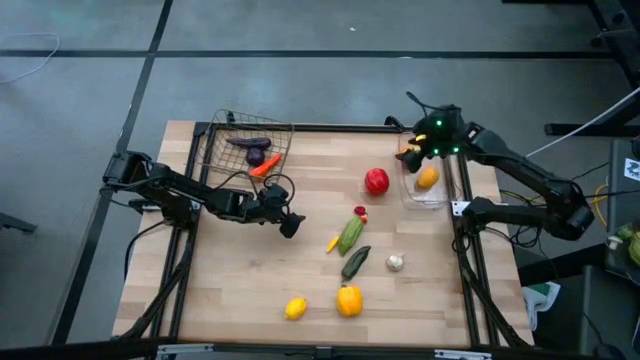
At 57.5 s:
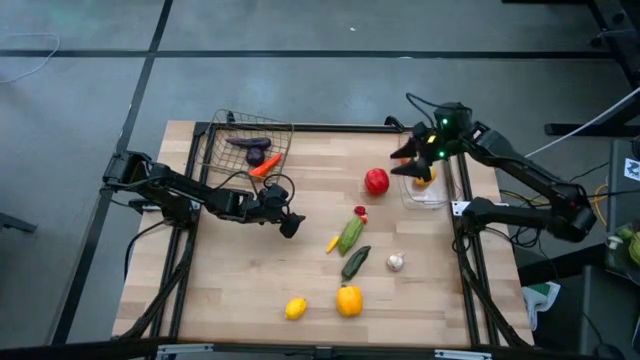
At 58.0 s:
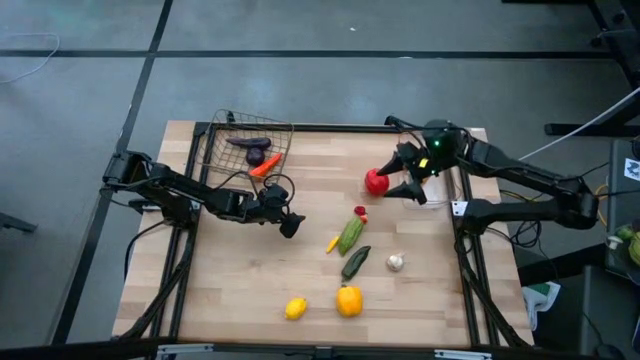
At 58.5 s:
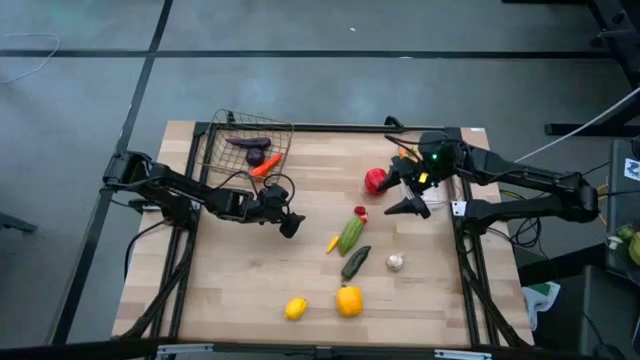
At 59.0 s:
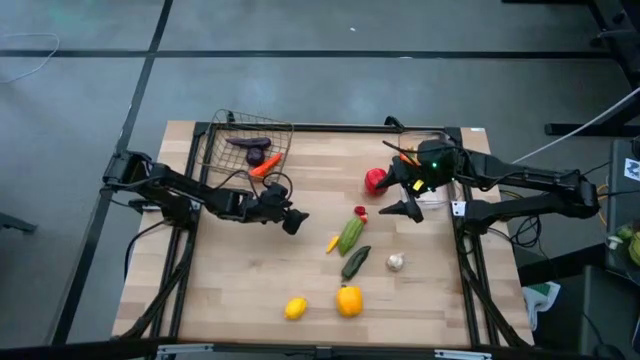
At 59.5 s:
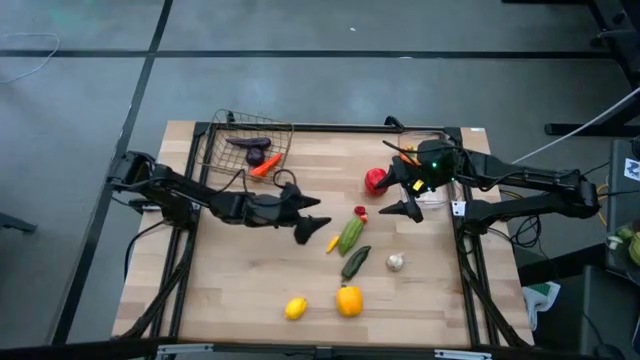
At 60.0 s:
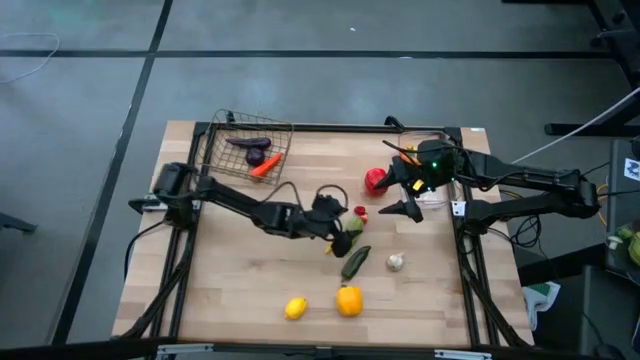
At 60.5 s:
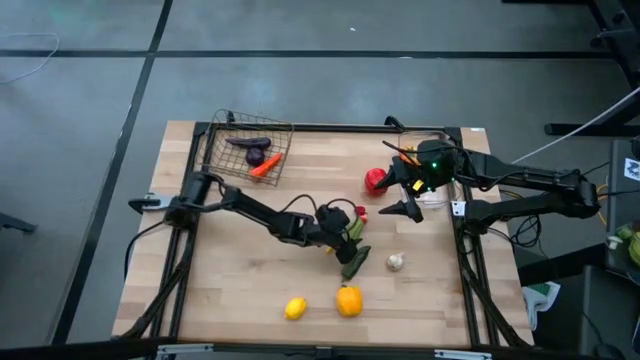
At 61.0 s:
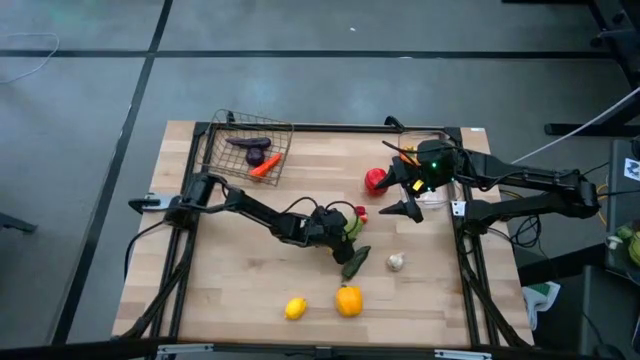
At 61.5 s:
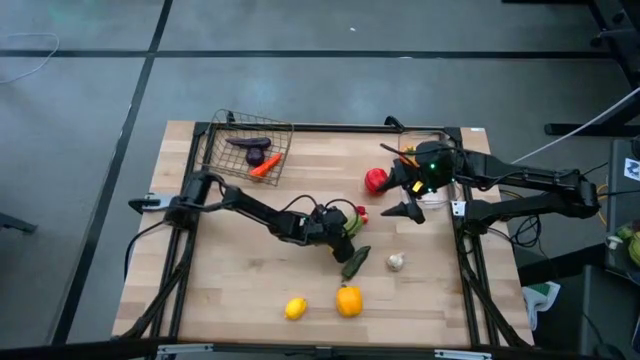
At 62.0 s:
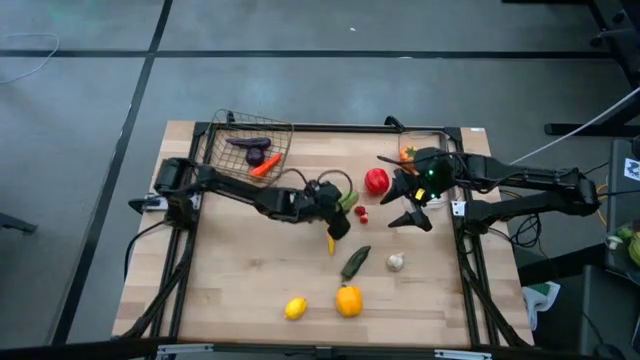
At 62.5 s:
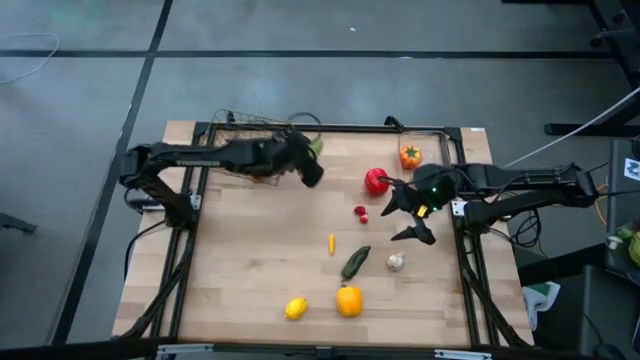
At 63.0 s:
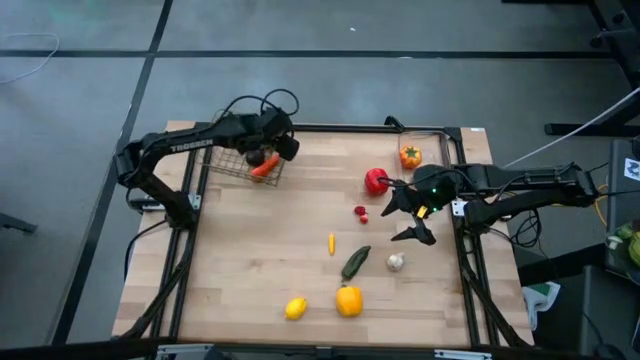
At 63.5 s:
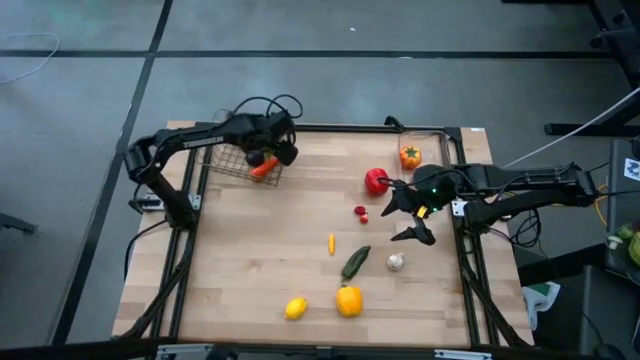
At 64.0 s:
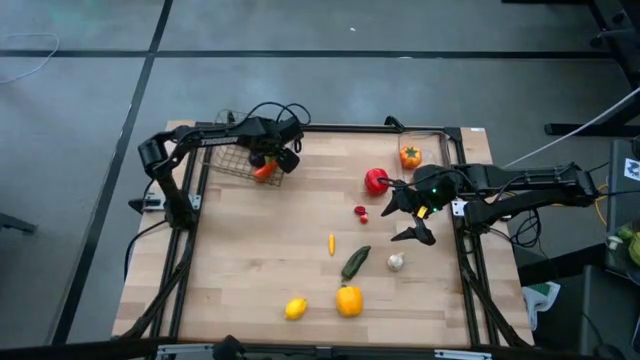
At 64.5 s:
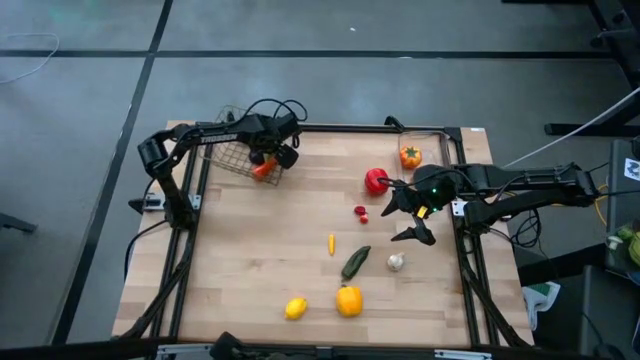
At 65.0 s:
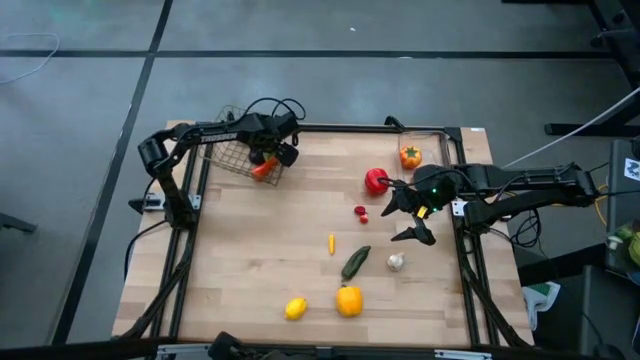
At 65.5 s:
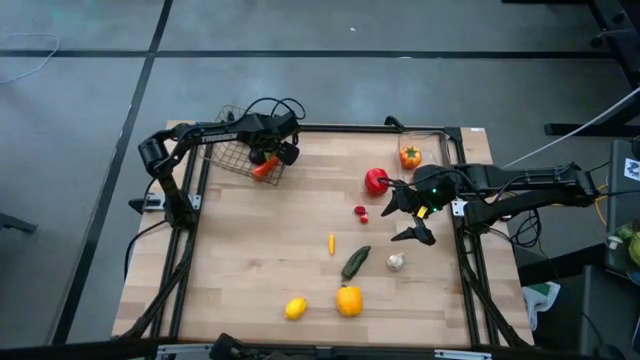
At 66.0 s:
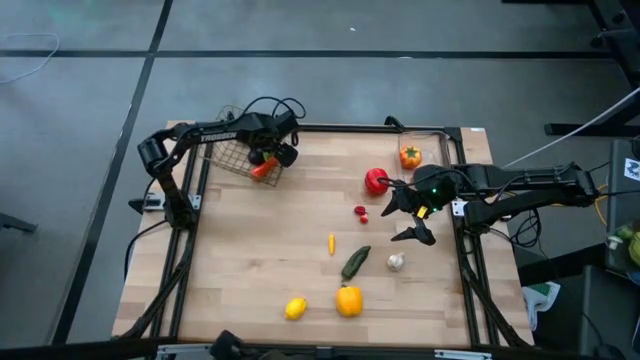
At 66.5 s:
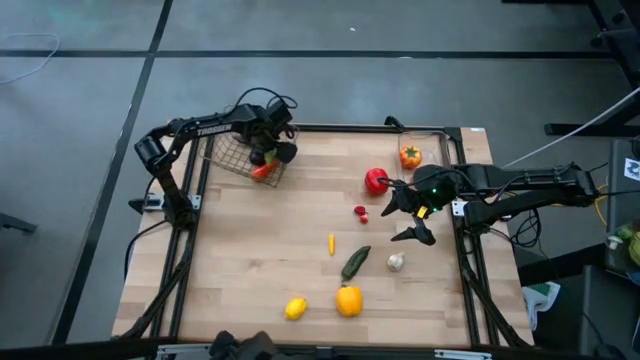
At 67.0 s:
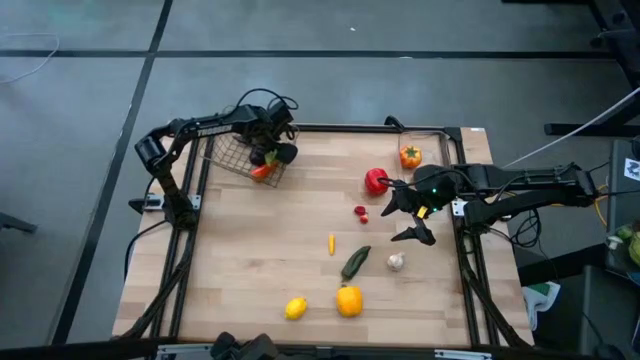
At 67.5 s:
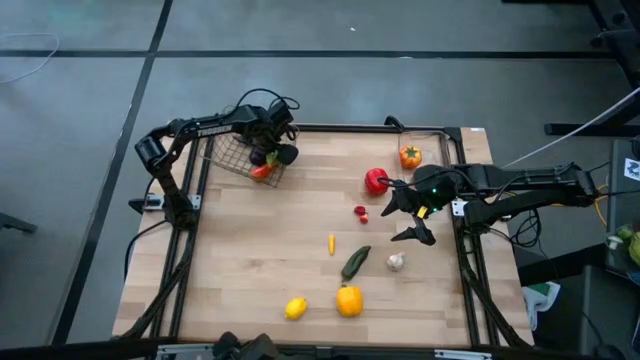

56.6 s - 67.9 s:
Task: Sort produce into baskets
Put the green cucumber into the silver wire basket

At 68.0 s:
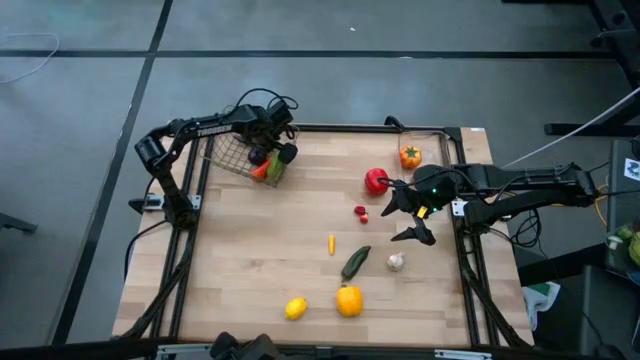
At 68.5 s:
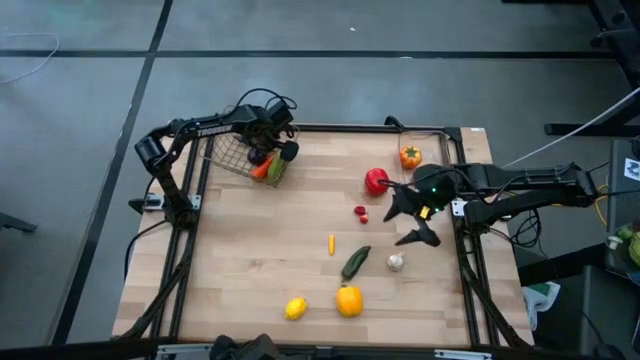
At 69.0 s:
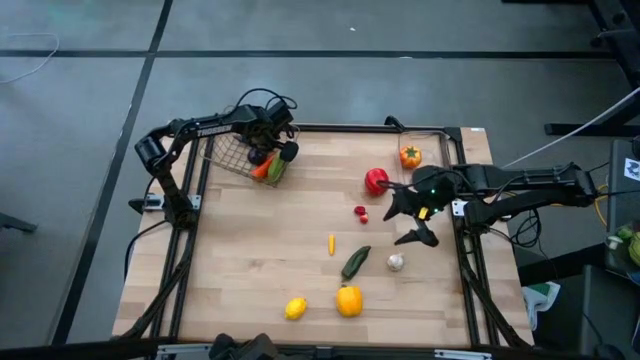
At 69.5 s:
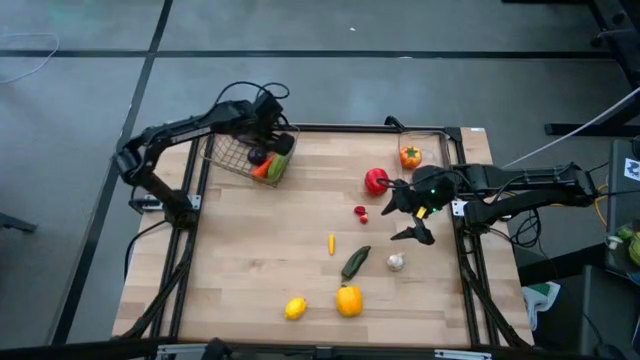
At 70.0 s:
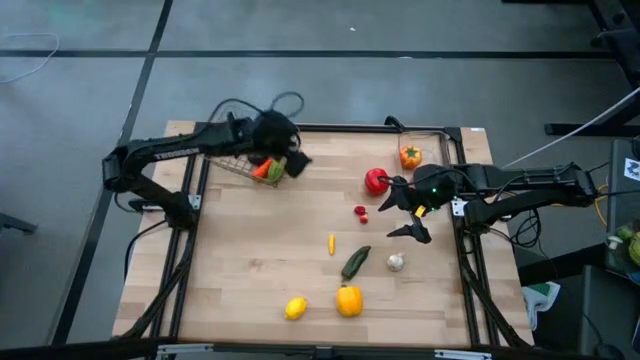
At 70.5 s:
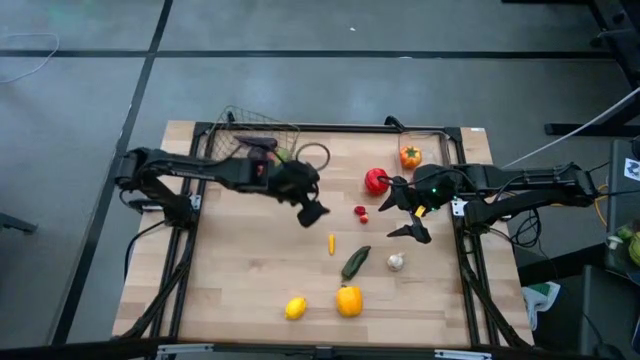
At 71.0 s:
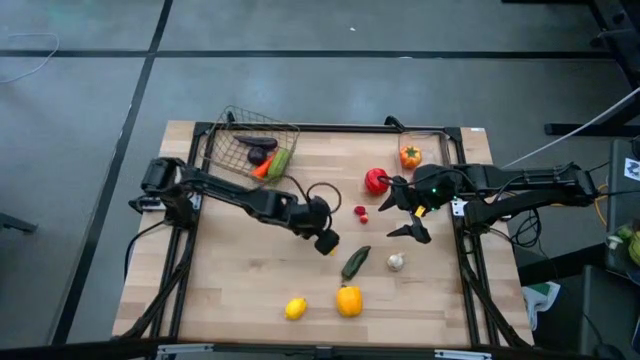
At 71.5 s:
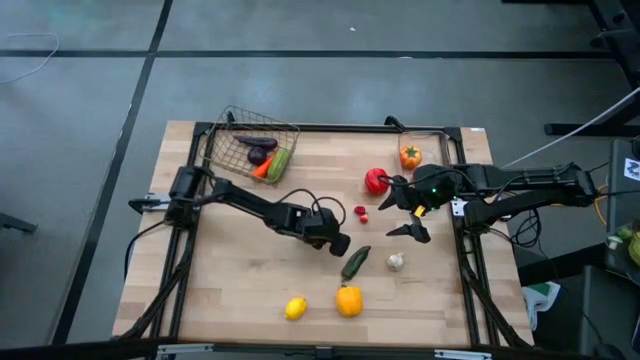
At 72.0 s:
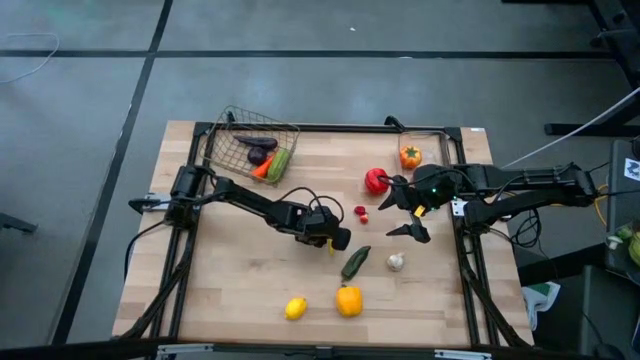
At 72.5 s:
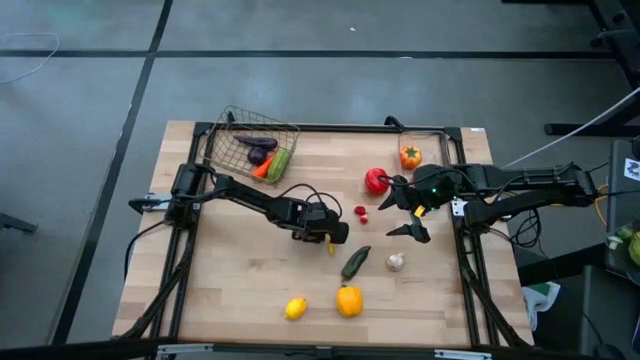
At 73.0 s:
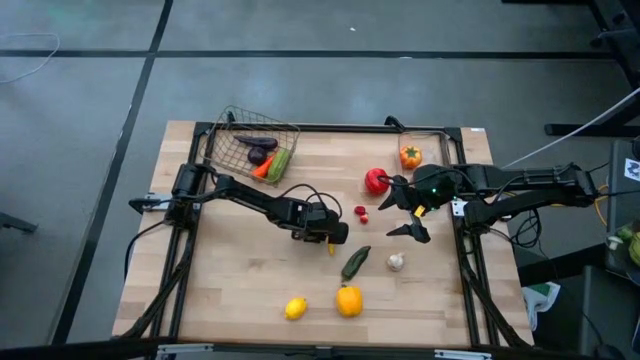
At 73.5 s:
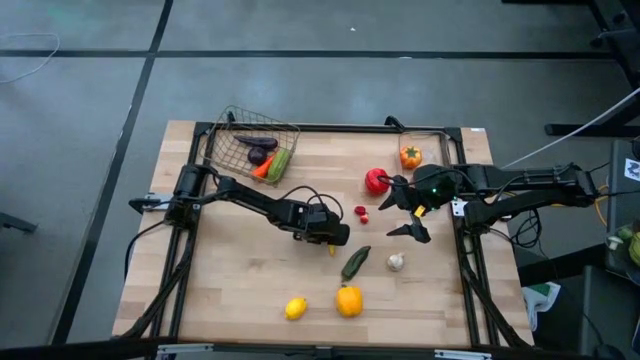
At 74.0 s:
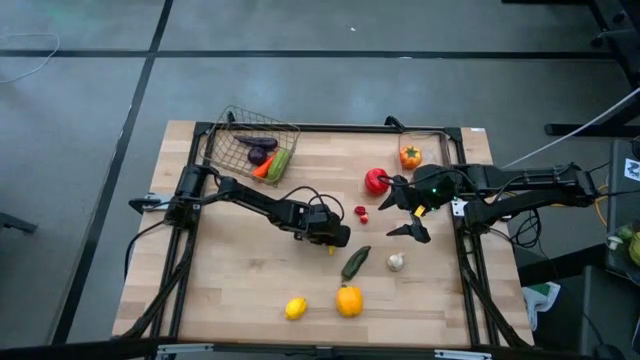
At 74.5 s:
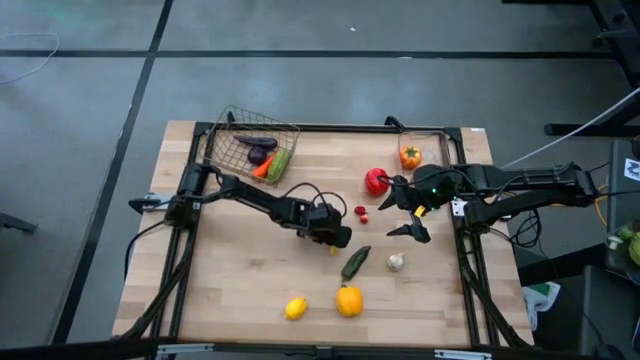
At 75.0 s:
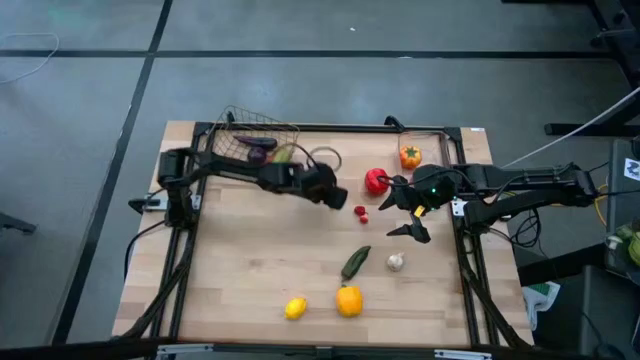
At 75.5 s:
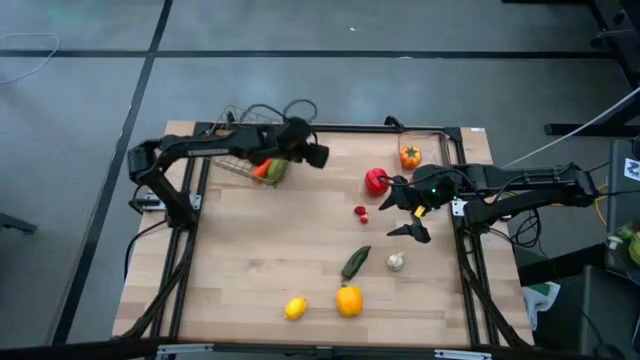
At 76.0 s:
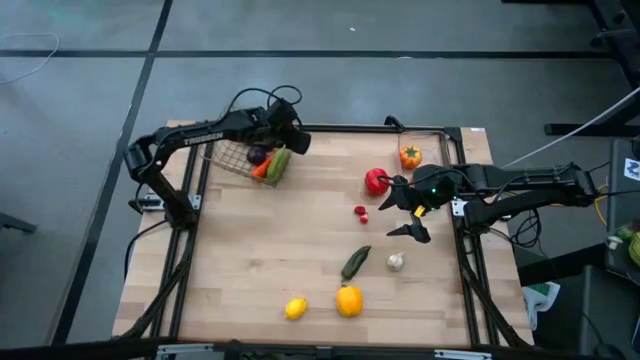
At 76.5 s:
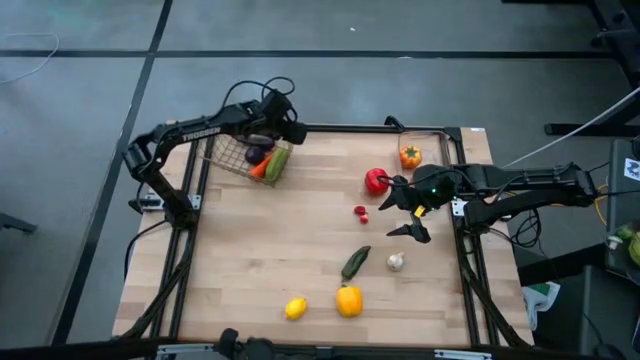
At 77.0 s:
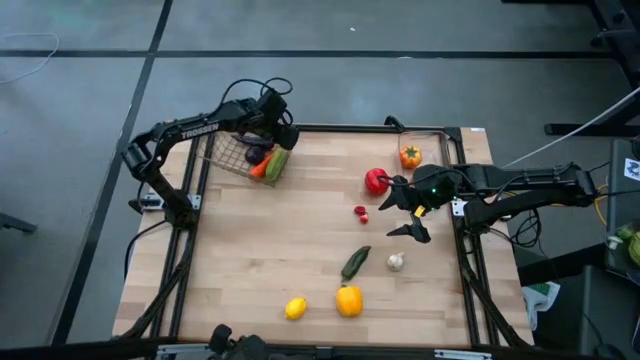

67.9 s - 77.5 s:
Put the yellow corn into the silver wire basket

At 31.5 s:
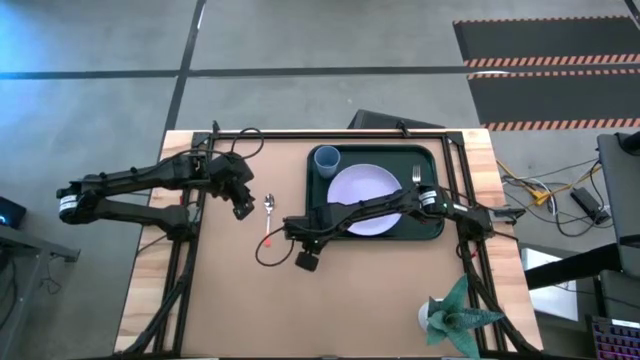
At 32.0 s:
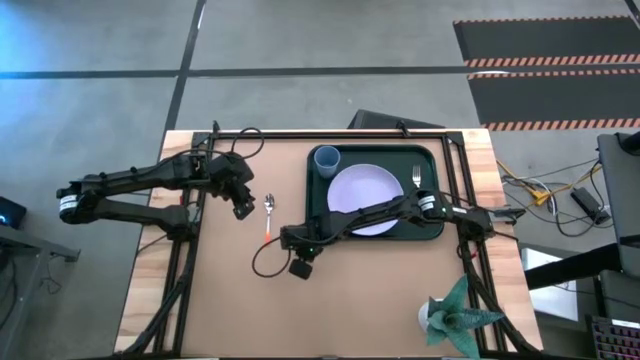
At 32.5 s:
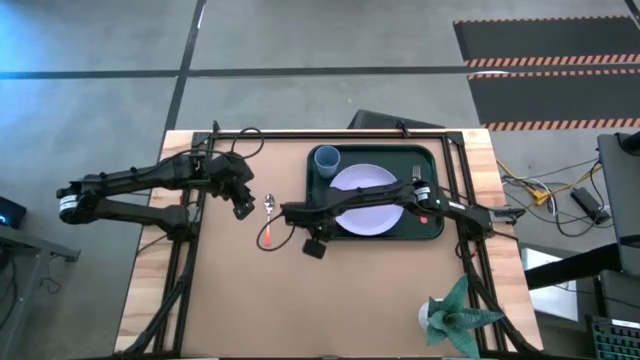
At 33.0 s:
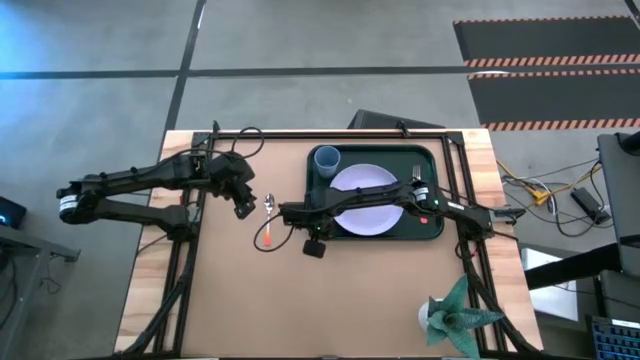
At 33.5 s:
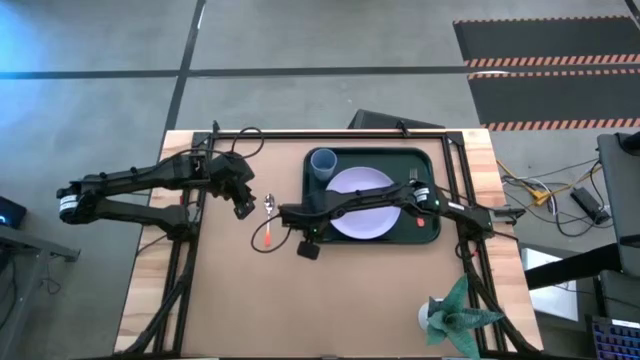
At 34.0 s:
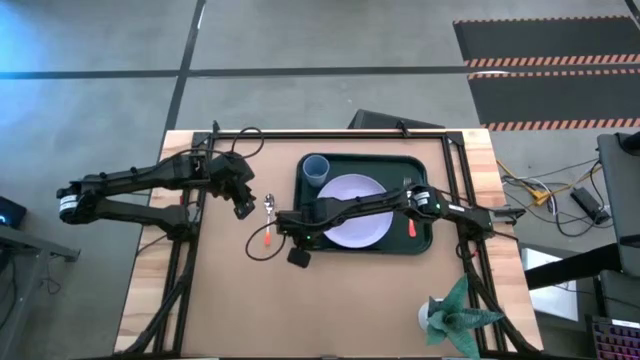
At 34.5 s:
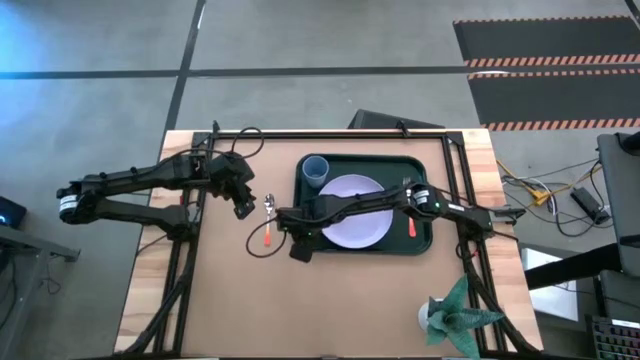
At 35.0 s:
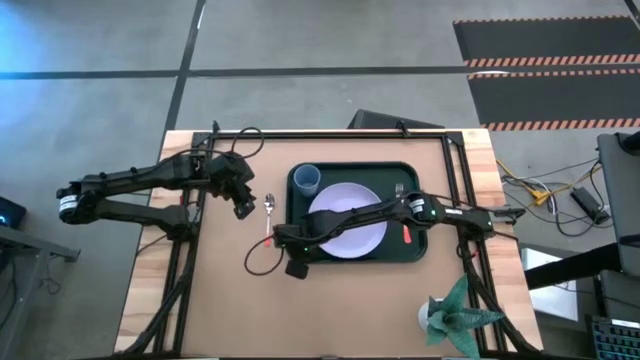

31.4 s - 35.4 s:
Task: Pick and place plate/cup/fork/spoon on tray
Move the black tray to the center of the table
